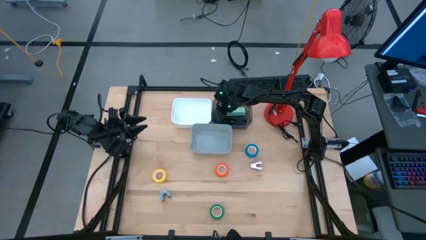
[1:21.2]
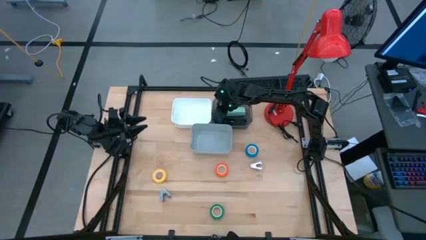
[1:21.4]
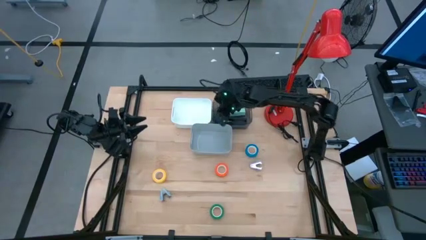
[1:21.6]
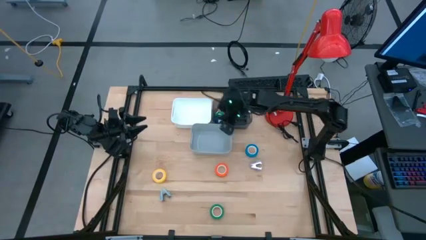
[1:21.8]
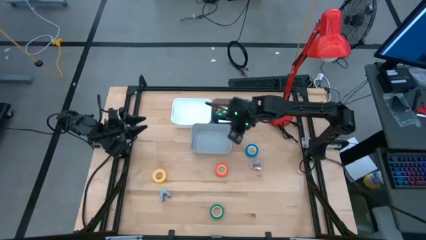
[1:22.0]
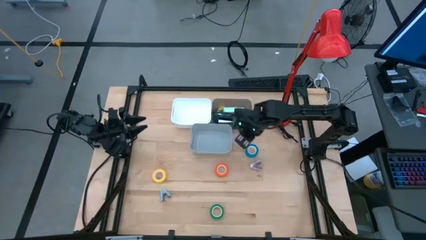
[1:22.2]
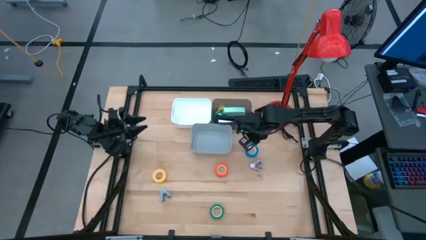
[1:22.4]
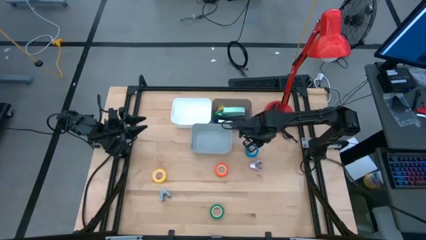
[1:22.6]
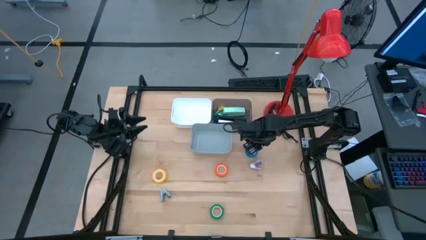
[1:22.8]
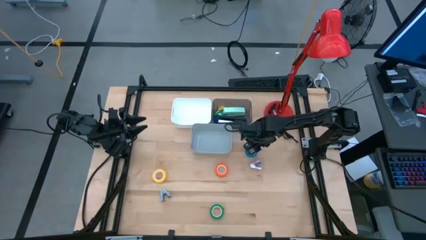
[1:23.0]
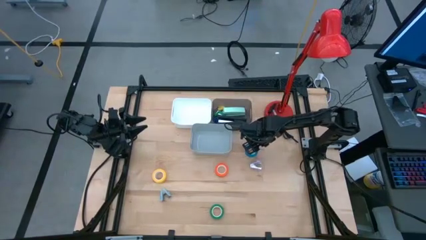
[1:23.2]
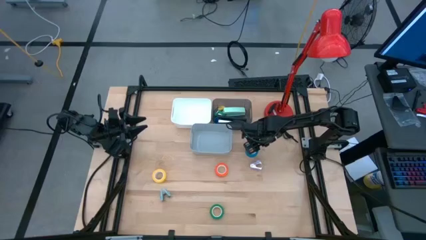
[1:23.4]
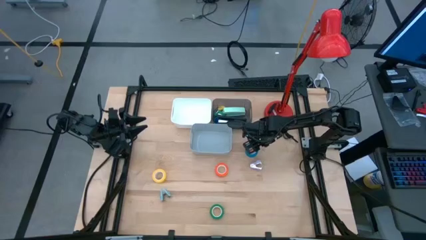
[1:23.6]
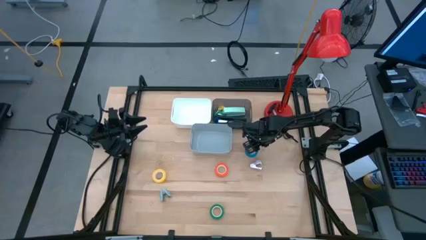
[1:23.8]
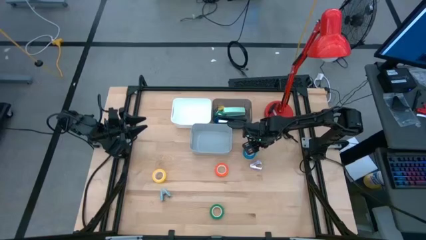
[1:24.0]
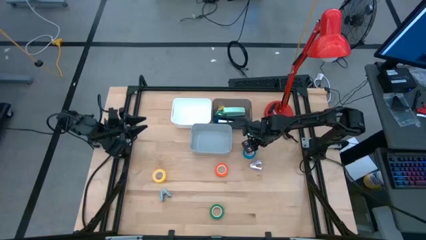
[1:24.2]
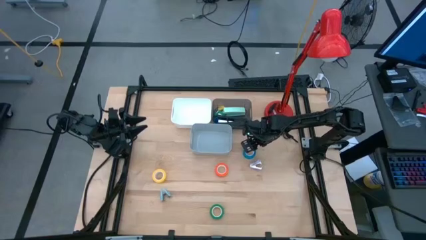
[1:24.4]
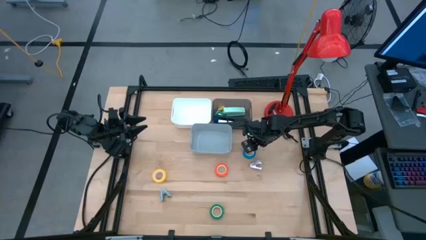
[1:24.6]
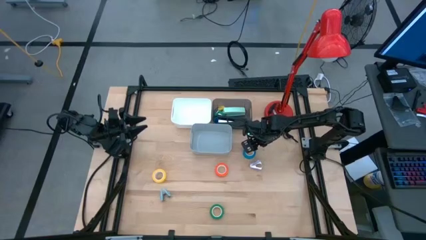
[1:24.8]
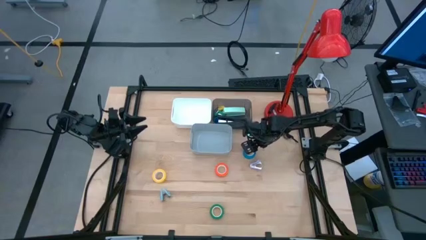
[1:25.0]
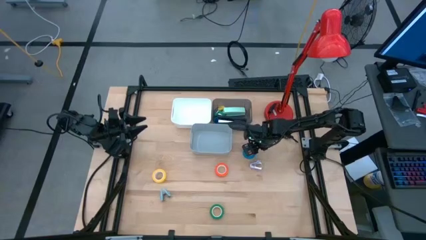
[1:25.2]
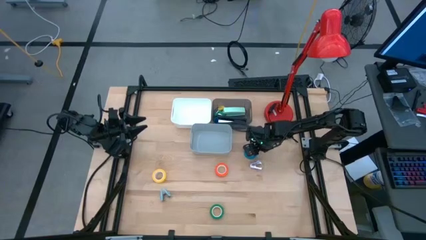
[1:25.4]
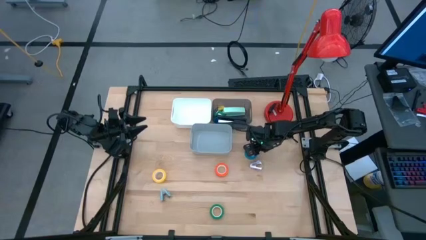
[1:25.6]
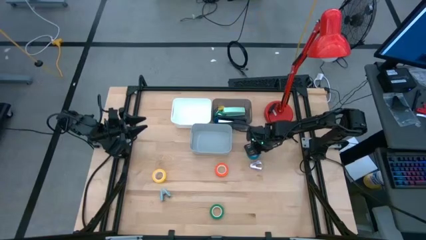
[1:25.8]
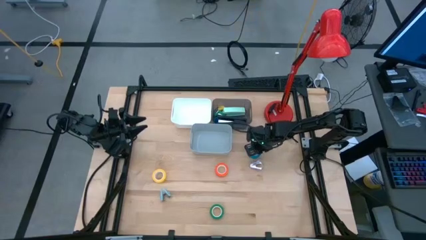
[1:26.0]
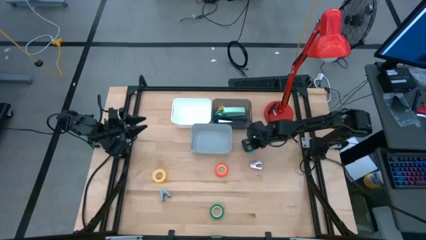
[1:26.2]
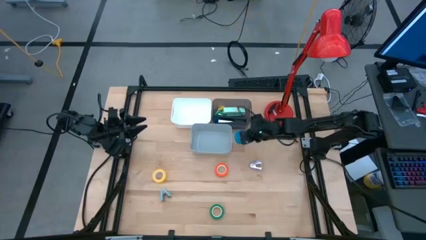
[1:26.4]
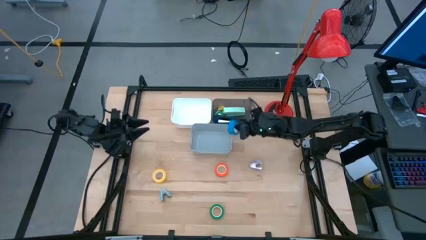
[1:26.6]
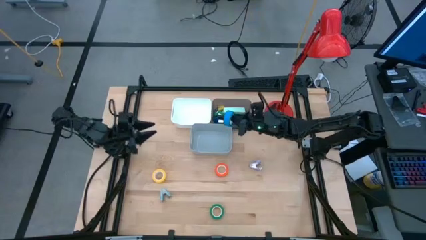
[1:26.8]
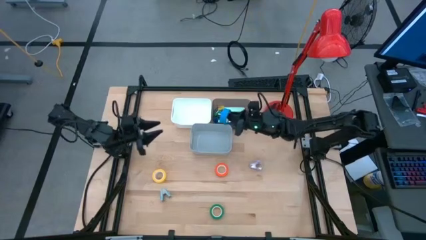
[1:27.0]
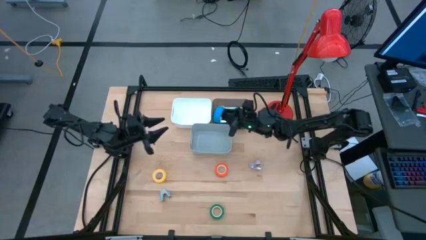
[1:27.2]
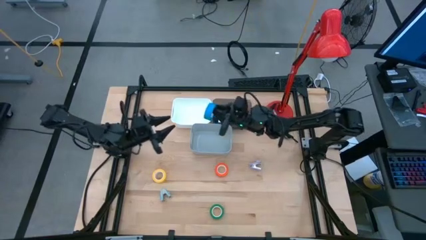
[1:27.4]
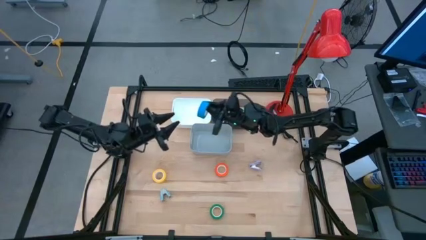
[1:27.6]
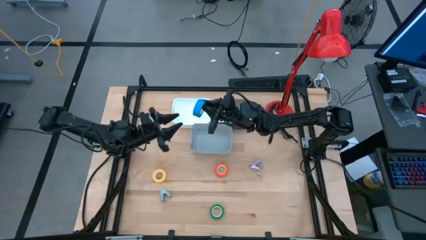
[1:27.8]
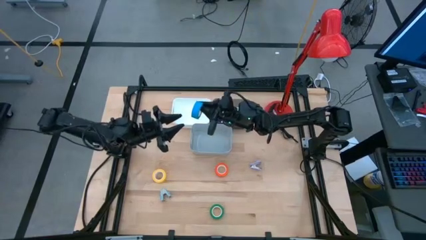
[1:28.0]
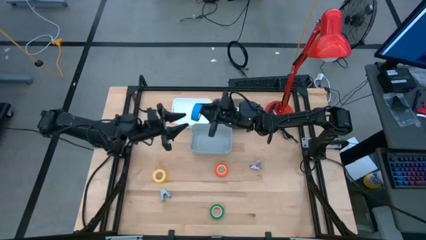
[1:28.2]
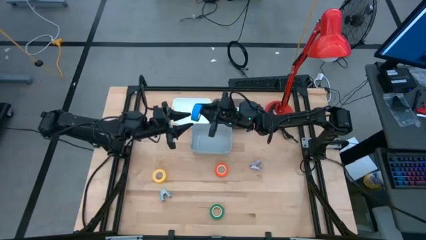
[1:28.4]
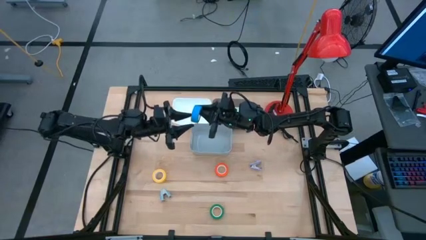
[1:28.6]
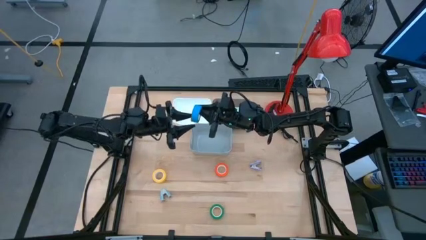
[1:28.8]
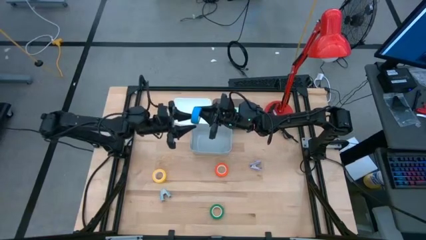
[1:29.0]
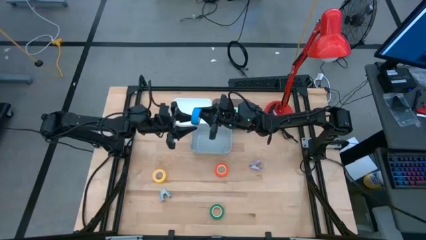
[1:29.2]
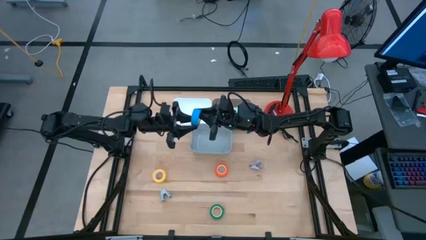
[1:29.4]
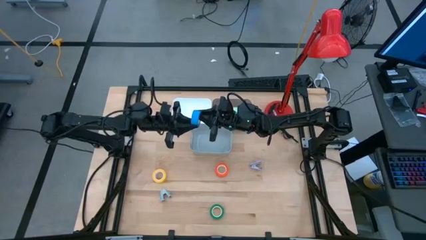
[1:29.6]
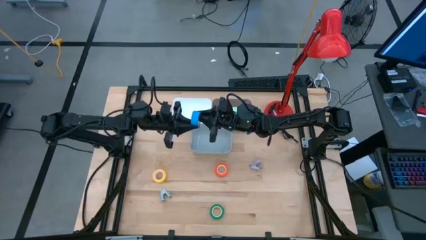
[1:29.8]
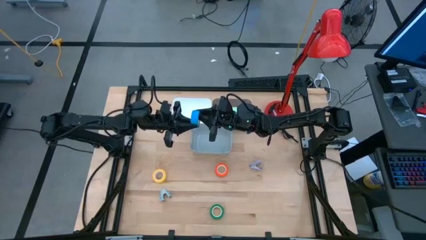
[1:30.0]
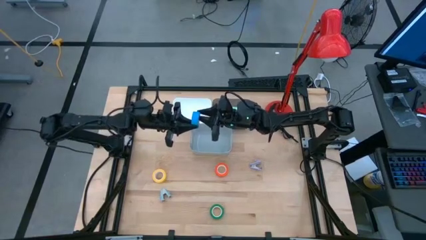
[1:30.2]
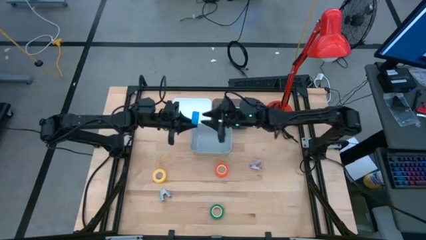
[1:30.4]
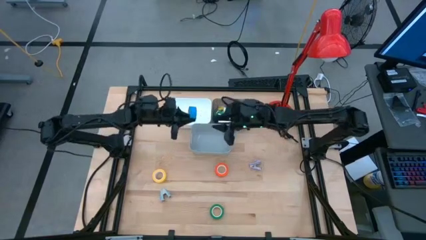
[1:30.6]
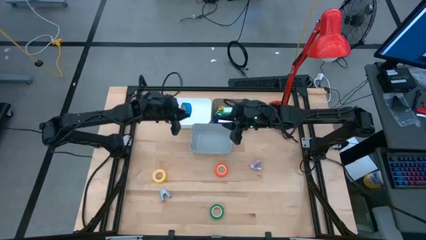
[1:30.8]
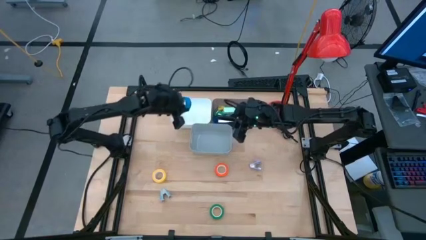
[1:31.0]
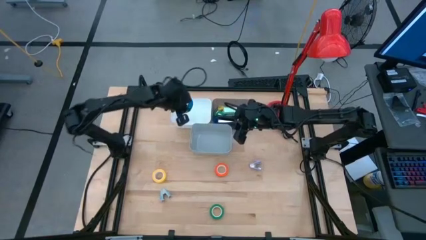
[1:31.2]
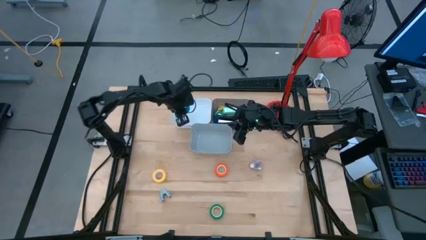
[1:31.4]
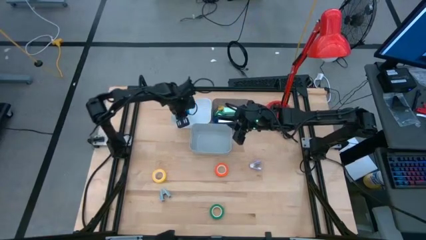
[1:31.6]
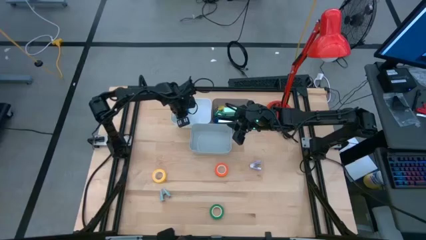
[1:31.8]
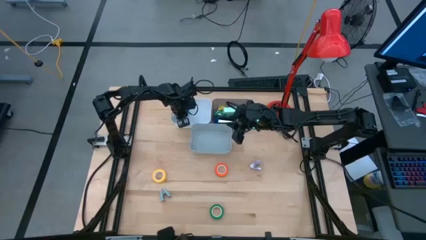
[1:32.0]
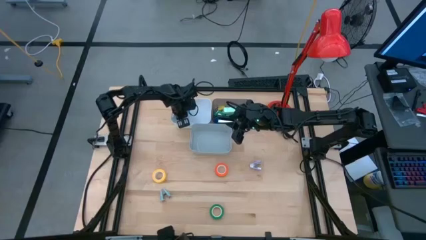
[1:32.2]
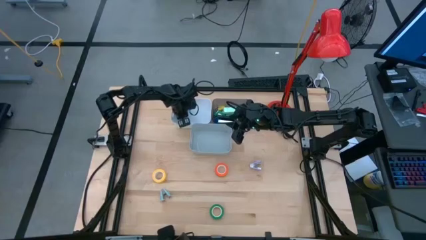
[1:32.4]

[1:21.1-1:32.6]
Task: Pick and place Stapler, Stapler remover, tape
Put the light blue tape into the white bin
